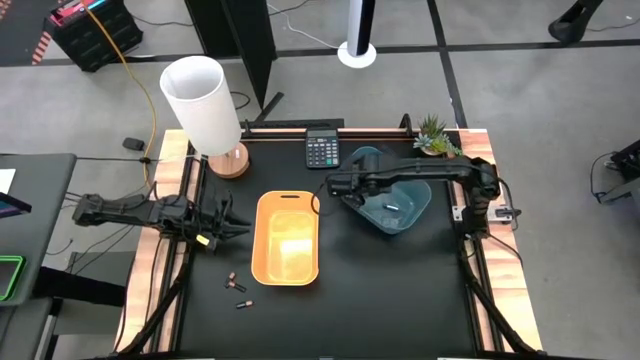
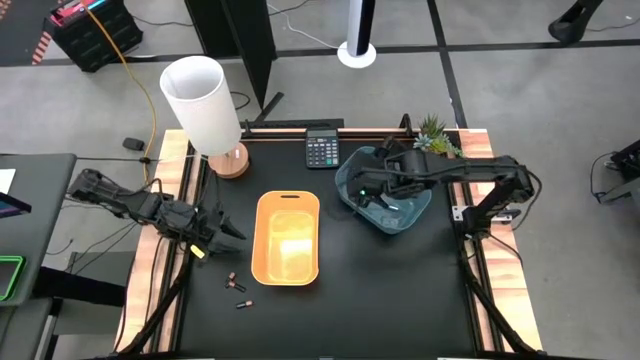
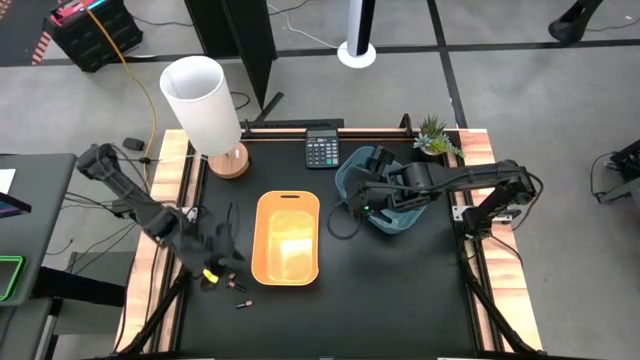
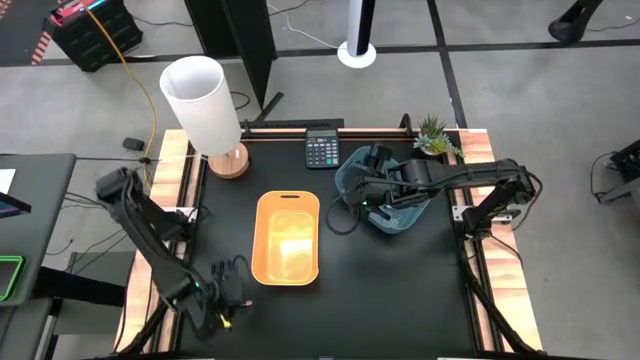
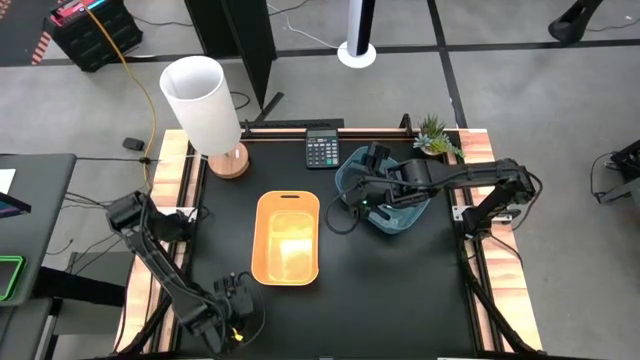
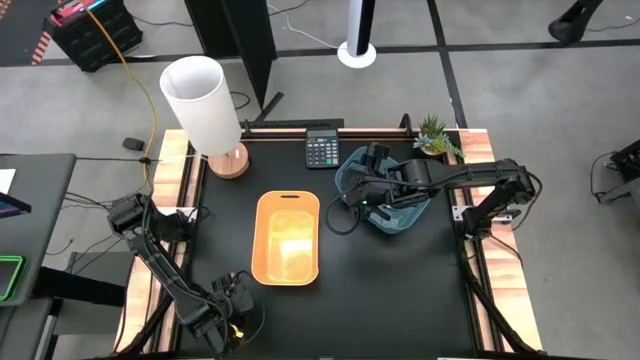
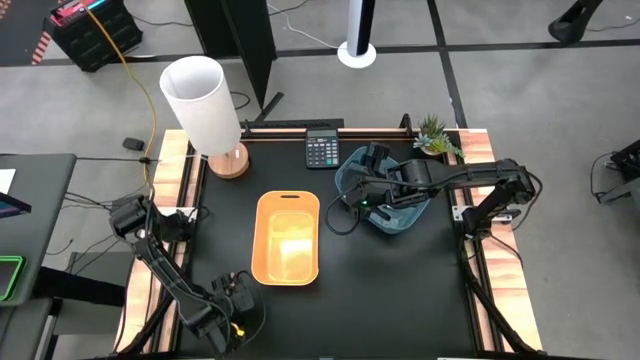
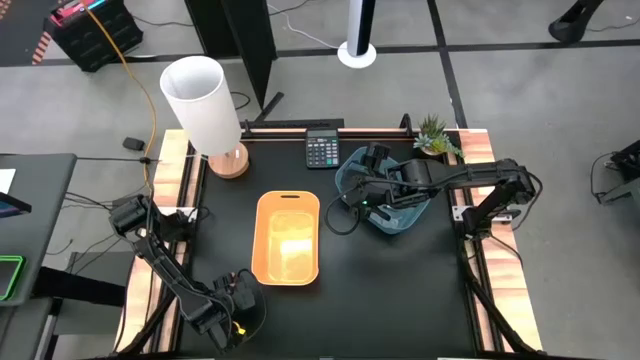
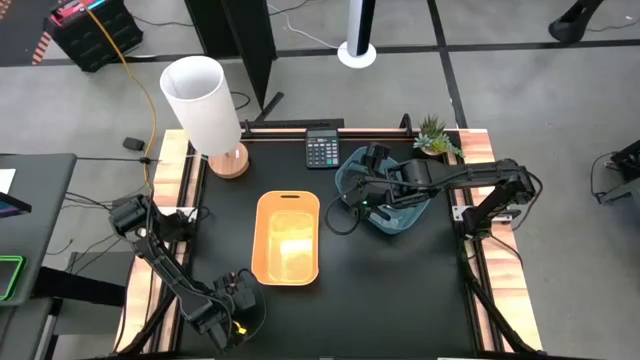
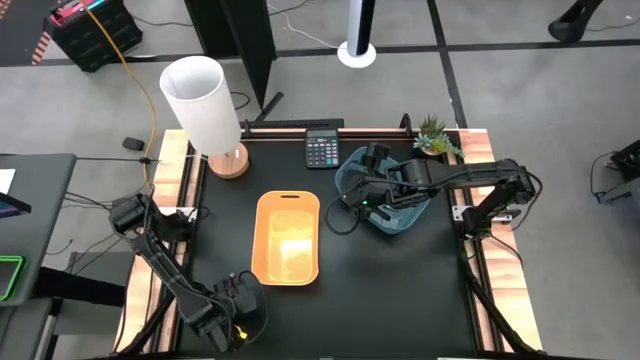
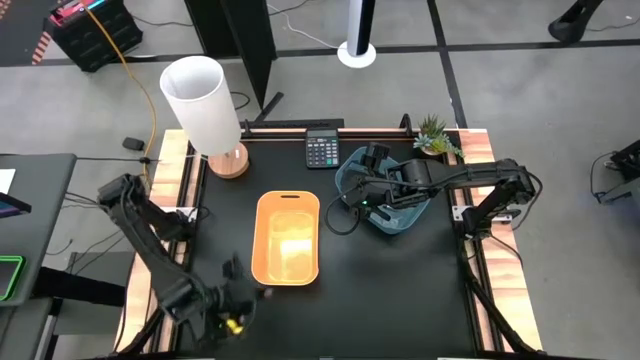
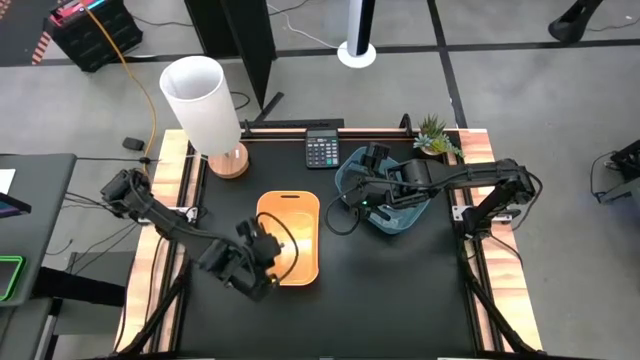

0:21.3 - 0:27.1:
Task: Sort batteries
Put the bottom black battery into the yellow bin

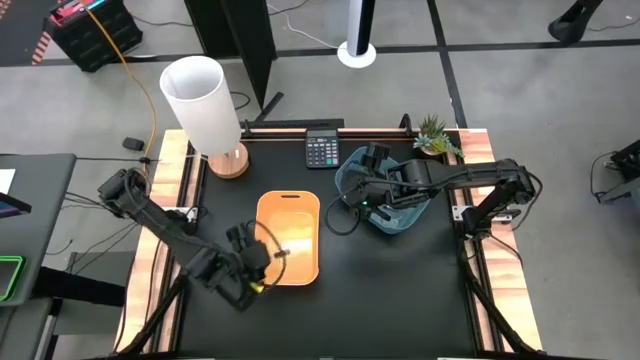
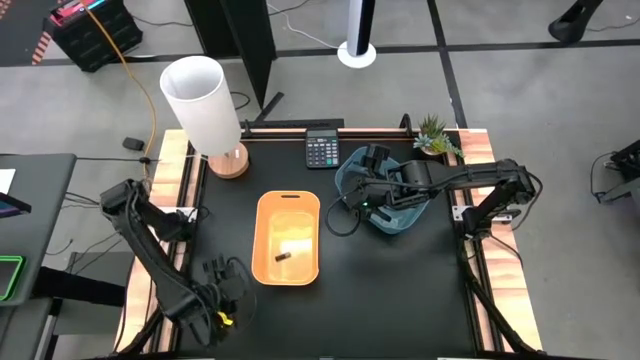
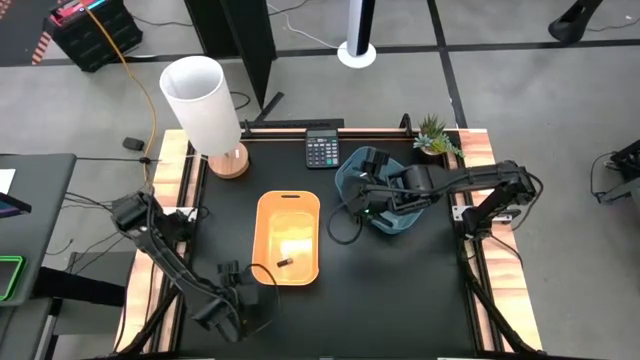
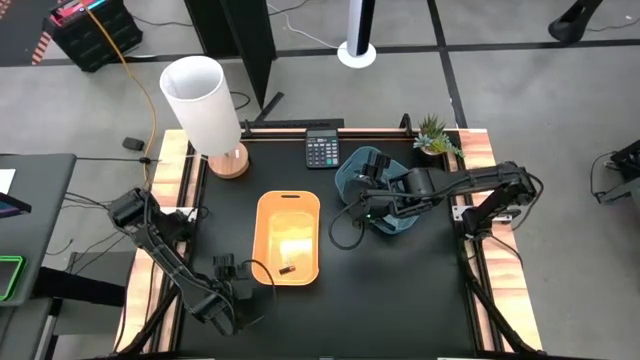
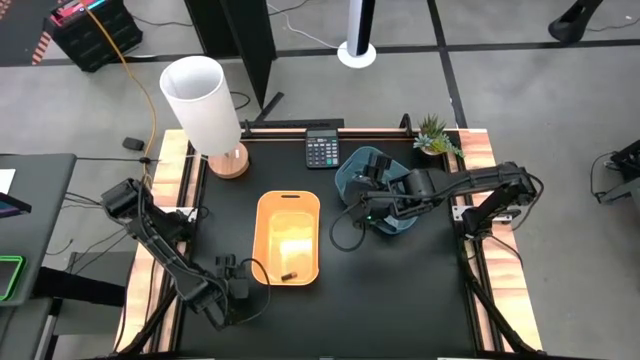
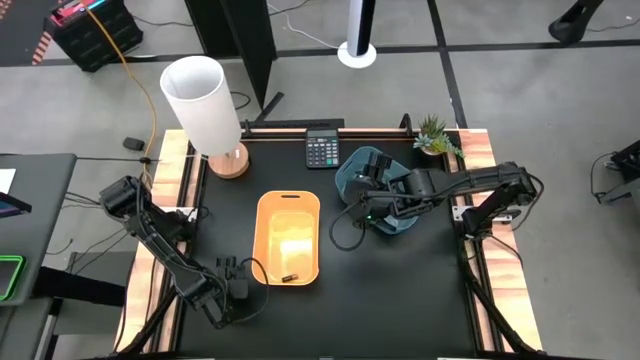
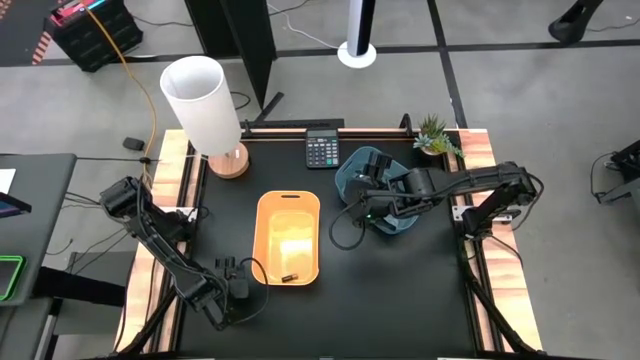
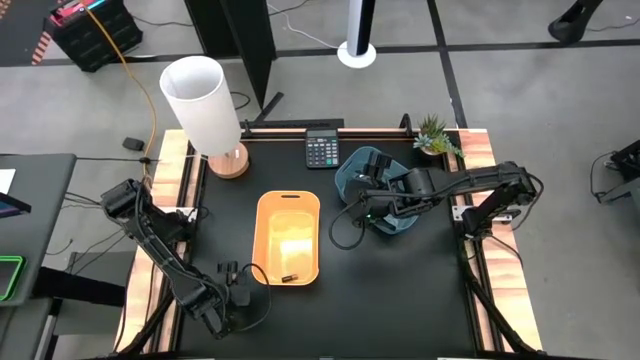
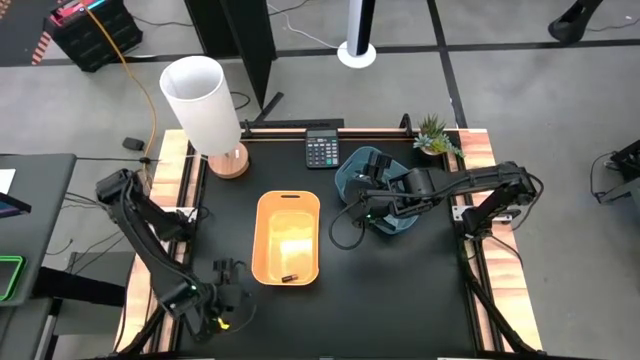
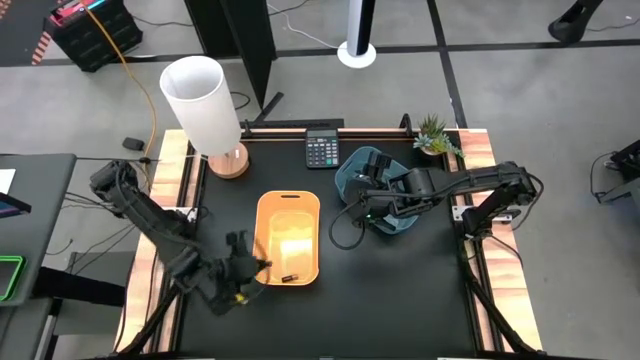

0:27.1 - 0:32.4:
Put the right black battery into the yellow bin

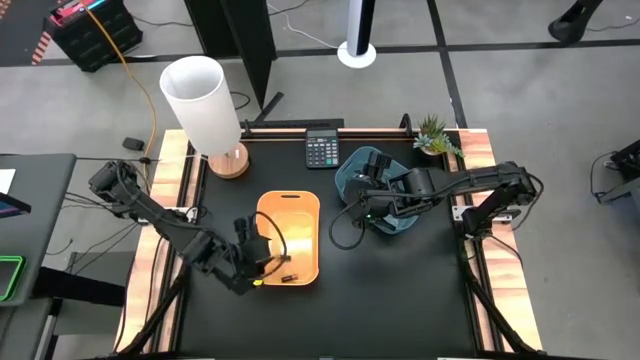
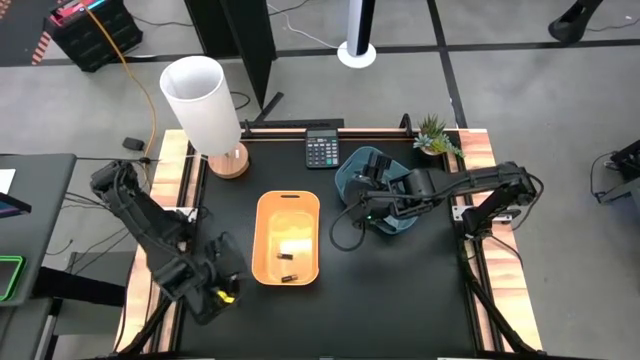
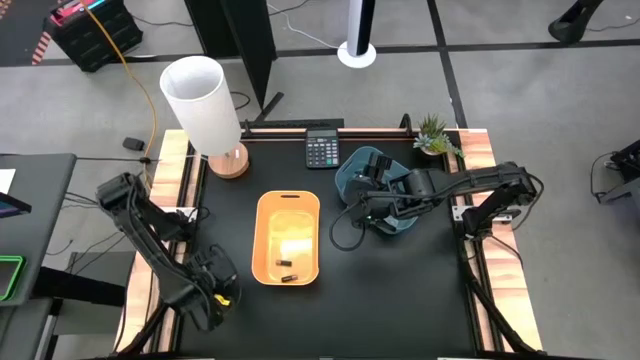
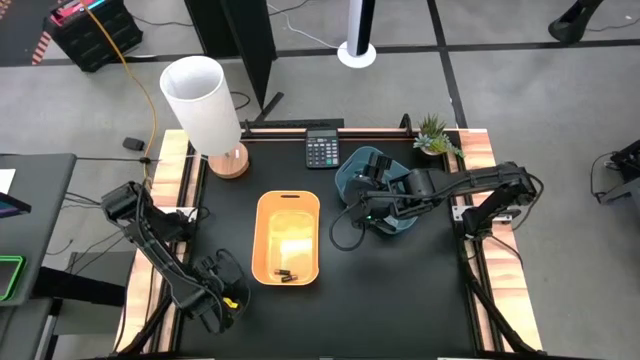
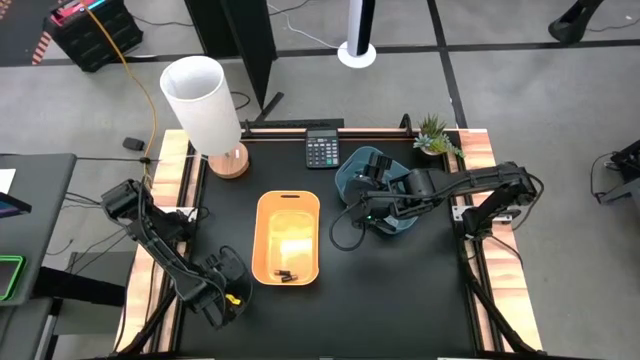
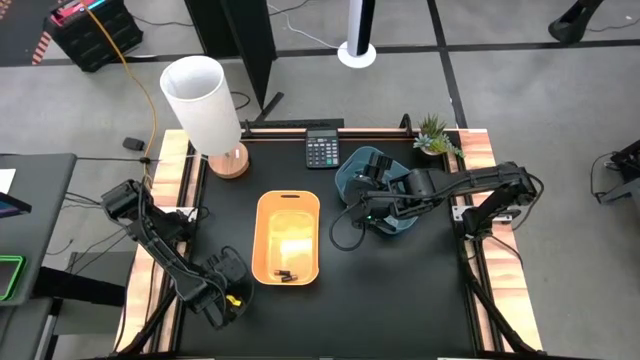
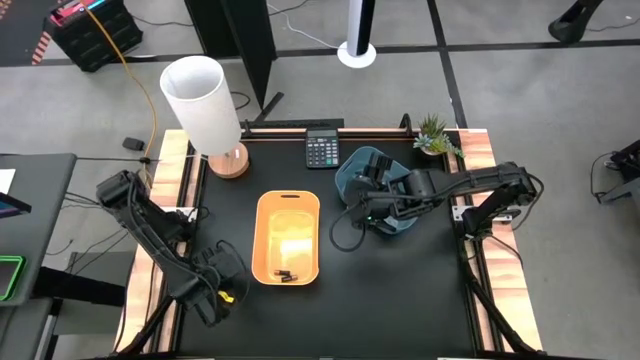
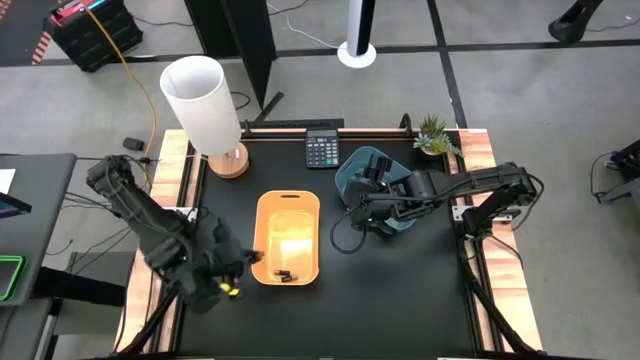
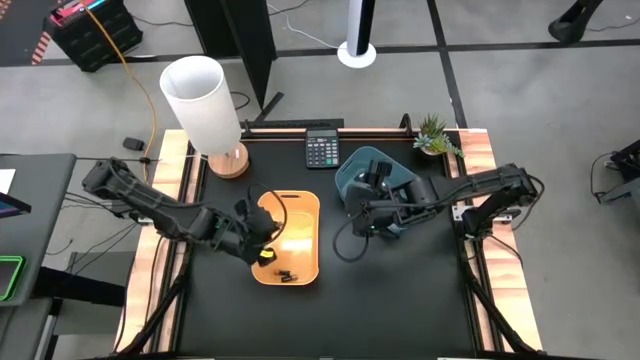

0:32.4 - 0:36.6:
Put the black battery into the yellow bin

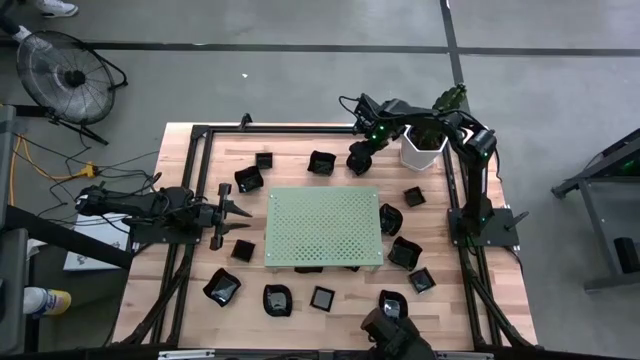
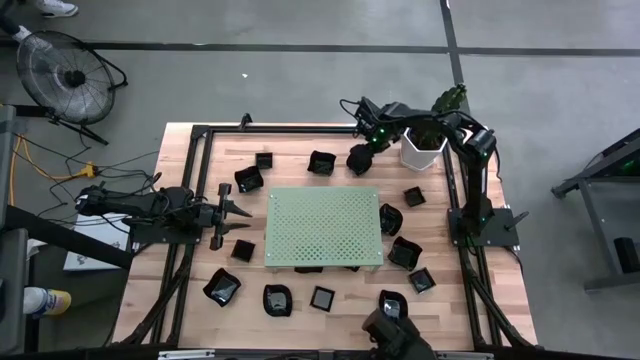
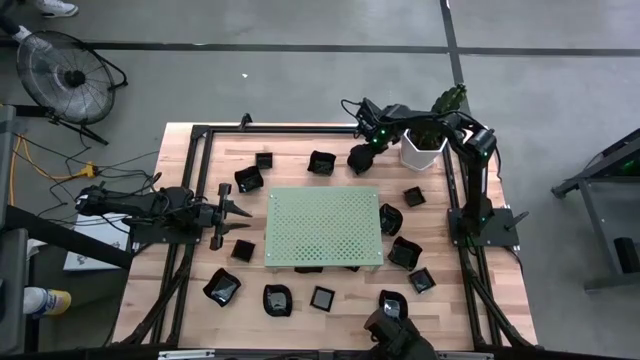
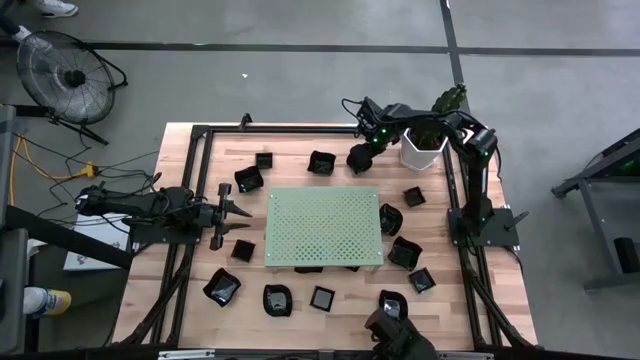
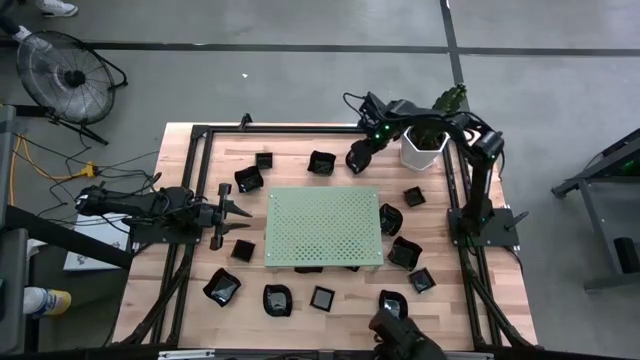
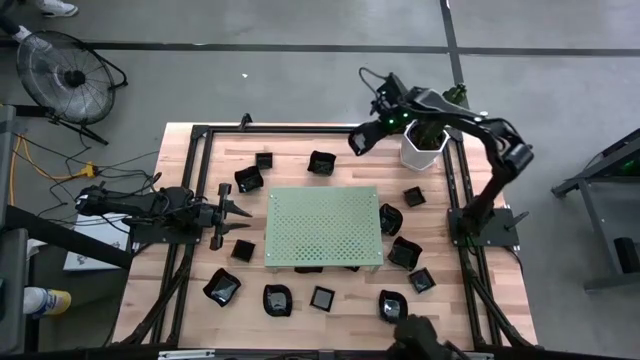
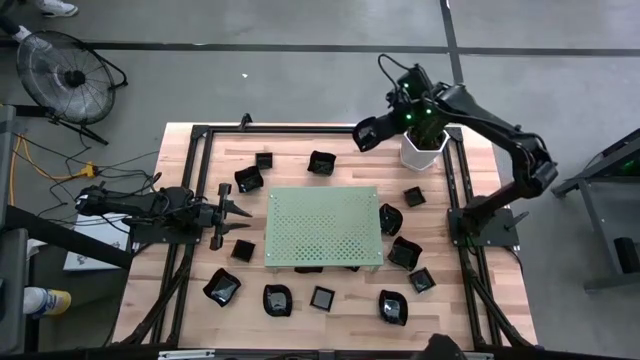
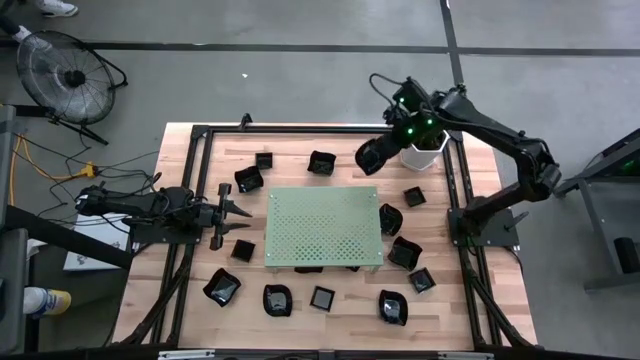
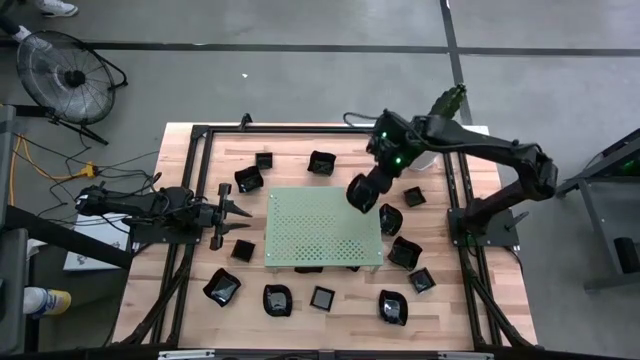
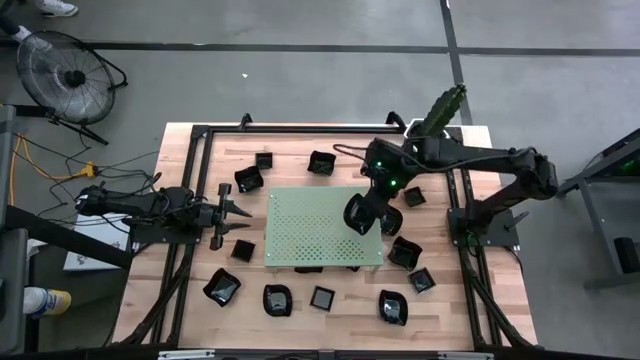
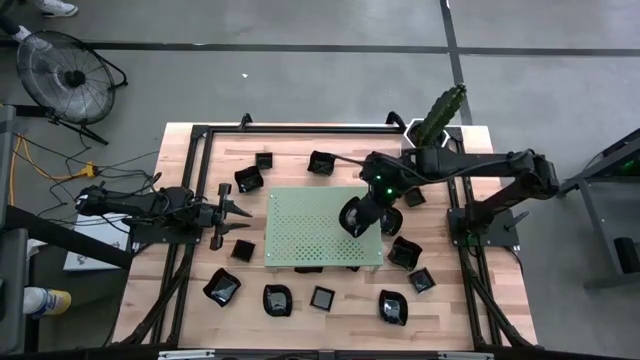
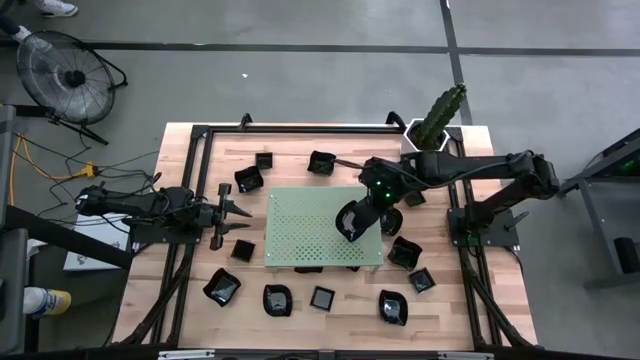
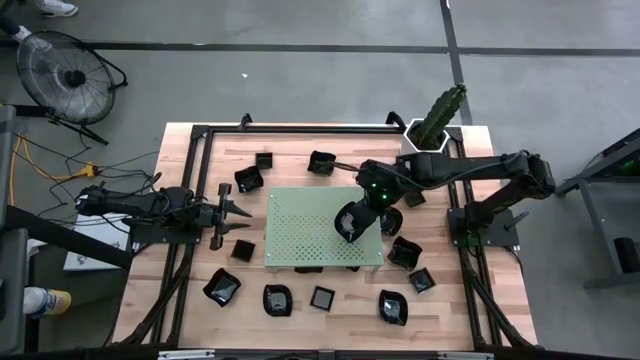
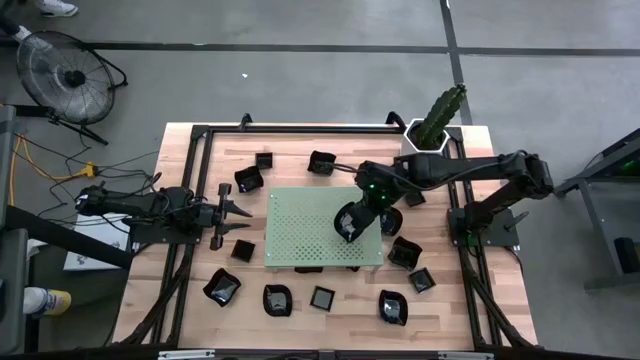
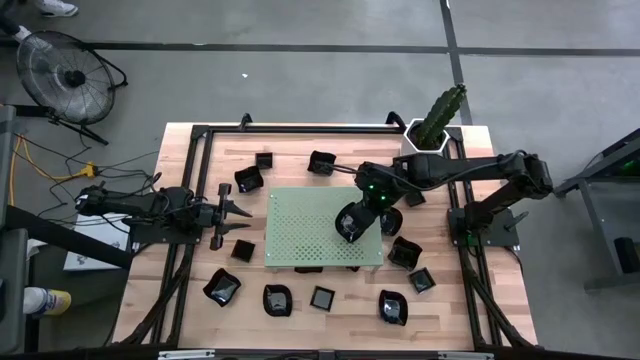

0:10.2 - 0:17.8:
Task: Pick & Place Mini shaped plates
Put the black leaf shaped bowl on the shelf
